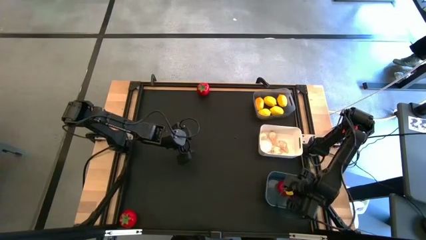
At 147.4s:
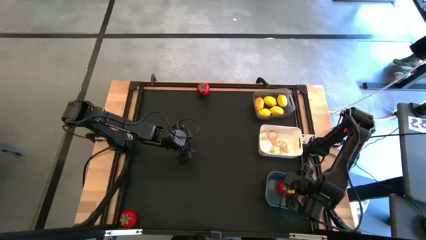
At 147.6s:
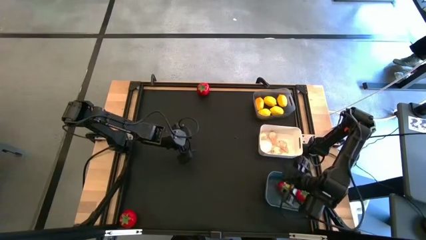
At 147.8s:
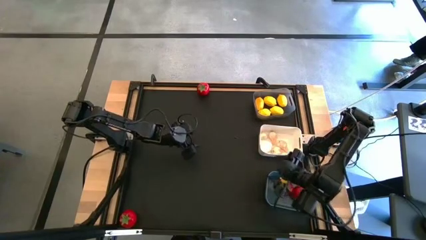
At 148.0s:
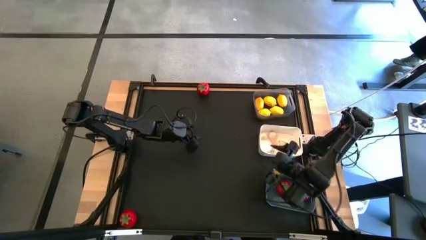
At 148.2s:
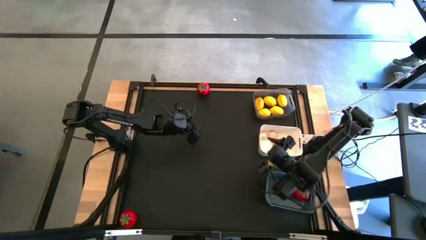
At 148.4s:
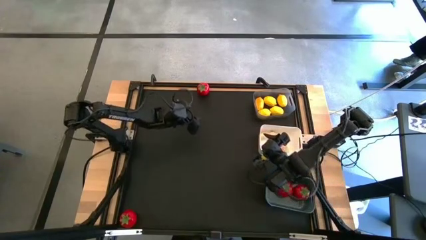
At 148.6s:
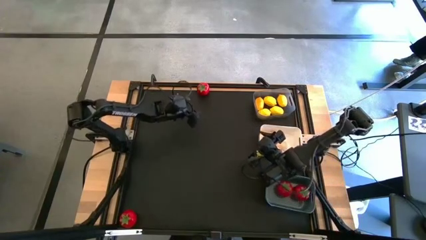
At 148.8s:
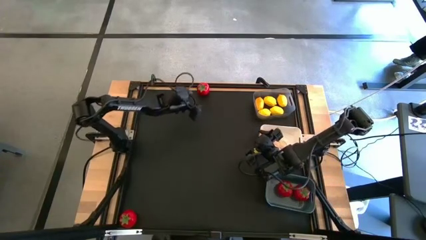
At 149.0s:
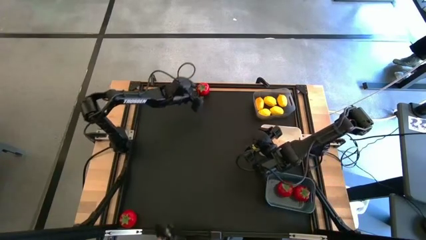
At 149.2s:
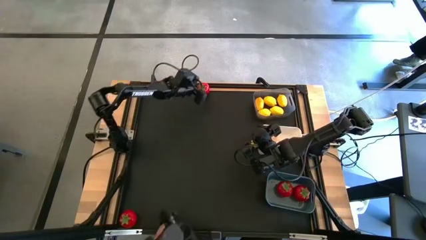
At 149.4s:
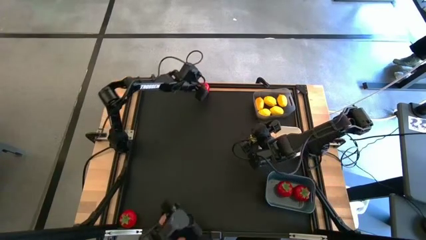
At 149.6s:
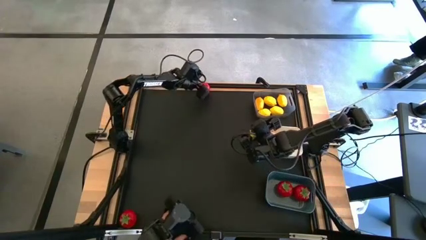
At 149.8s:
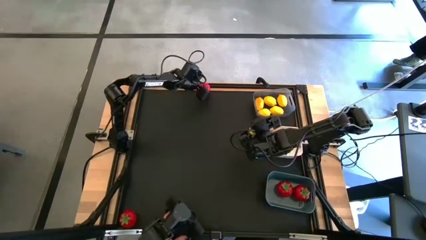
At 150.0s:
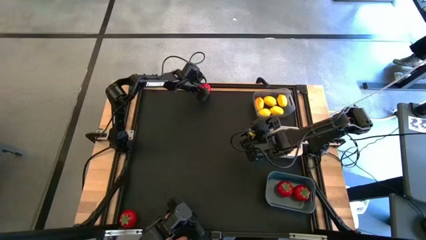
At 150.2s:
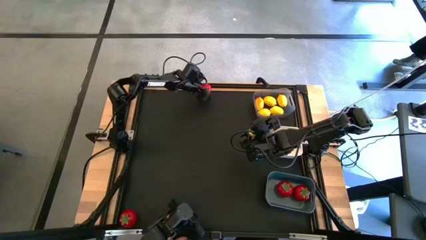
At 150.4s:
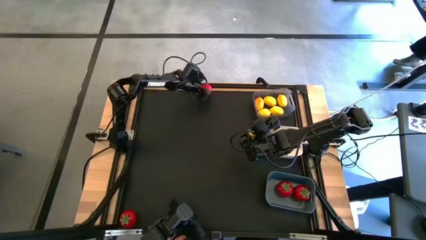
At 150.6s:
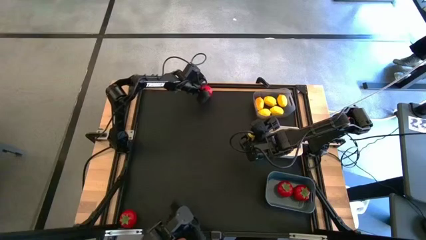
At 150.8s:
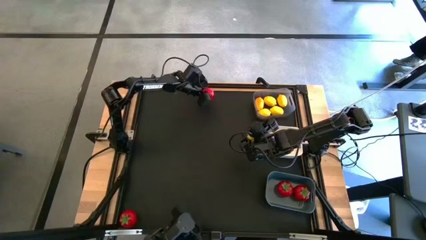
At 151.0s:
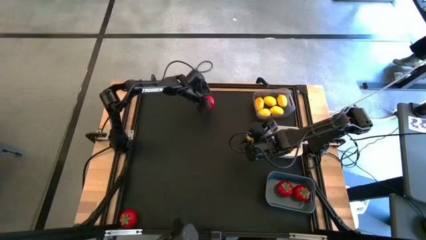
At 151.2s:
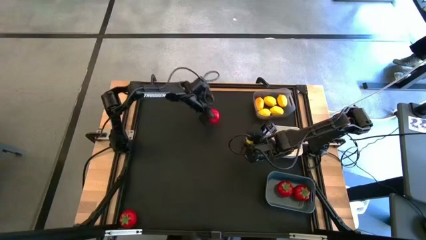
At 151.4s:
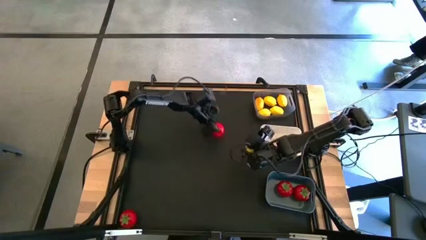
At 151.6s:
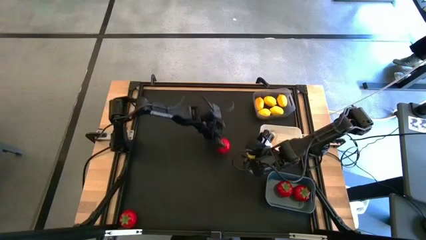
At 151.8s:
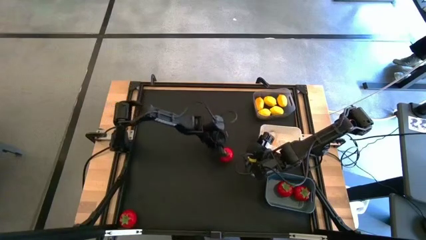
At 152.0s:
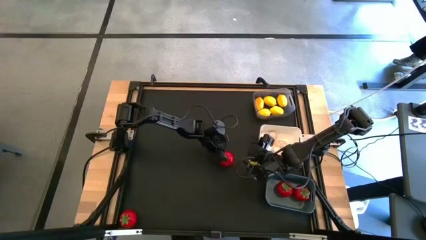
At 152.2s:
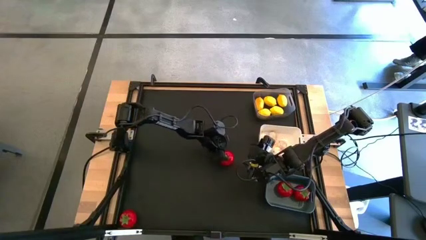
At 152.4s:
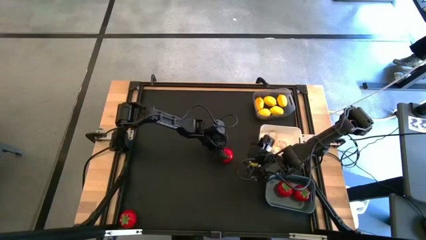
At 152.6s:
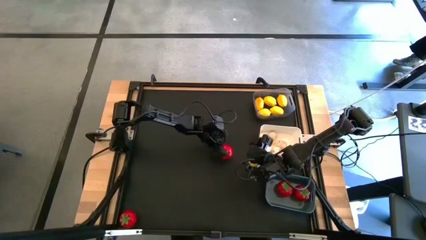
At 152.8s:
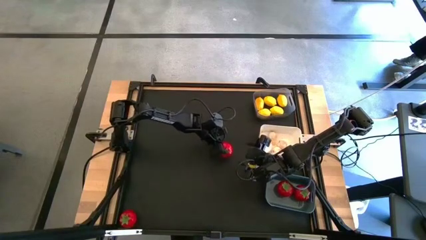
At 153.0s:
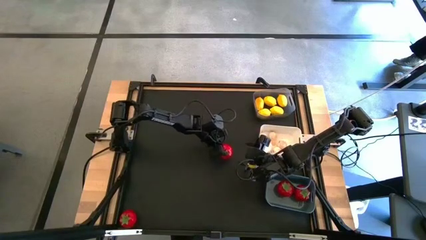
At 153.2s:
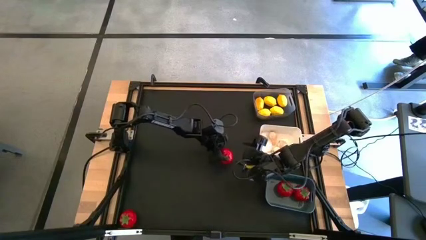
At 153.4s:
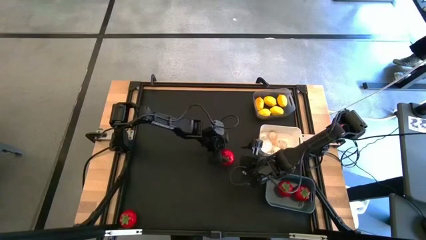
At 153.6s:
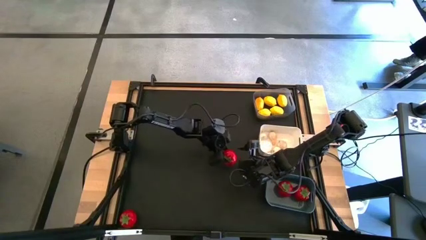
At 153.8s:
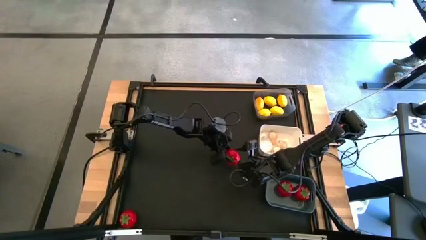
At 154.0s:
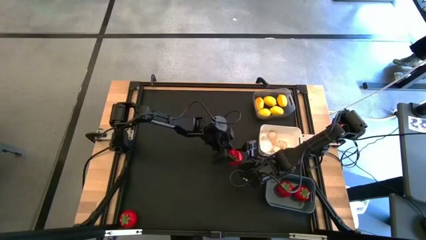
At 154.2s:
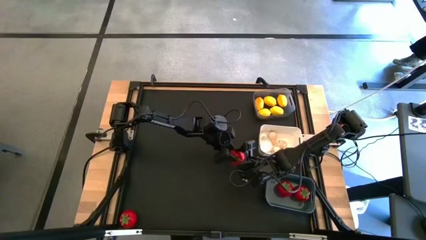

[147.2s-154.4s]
Task: Sort produce into baskets
Put the tomato into the the blue bin

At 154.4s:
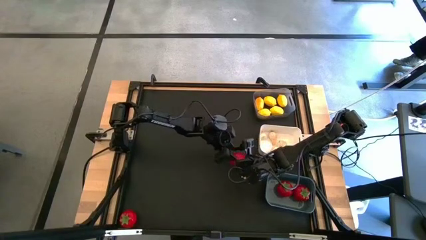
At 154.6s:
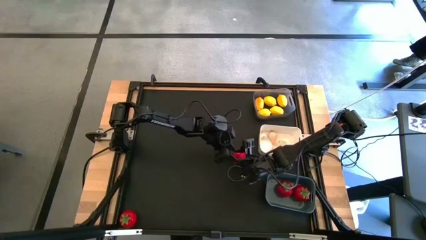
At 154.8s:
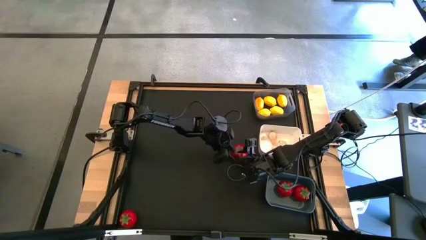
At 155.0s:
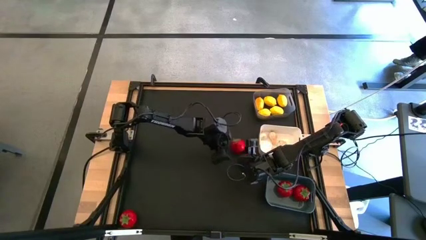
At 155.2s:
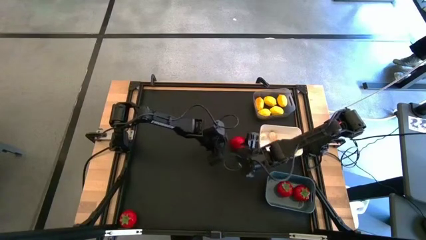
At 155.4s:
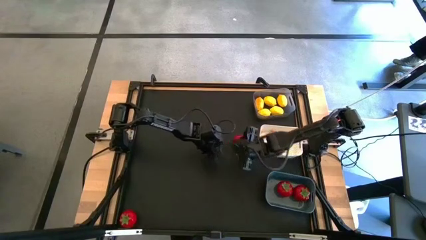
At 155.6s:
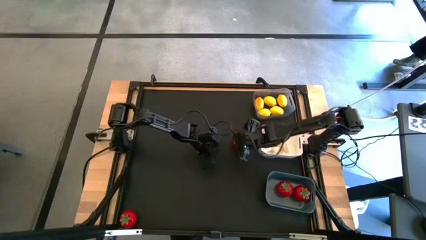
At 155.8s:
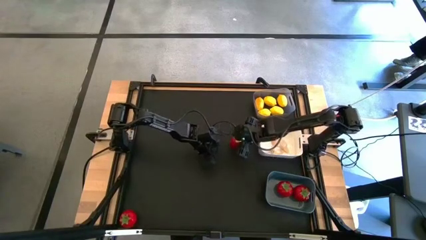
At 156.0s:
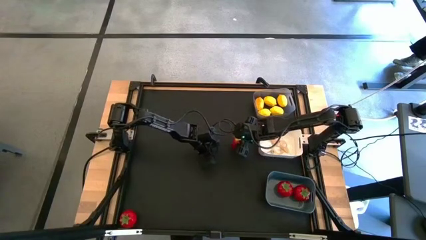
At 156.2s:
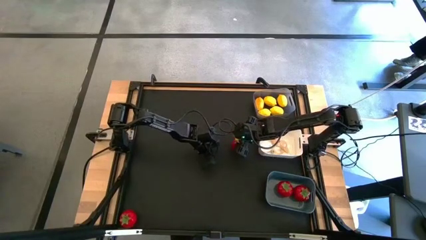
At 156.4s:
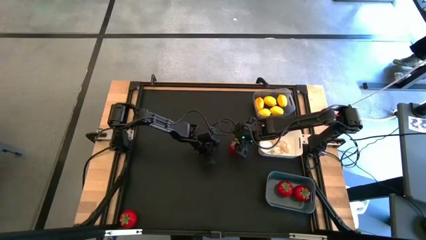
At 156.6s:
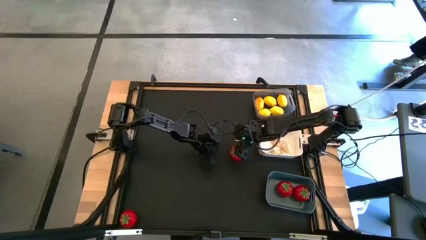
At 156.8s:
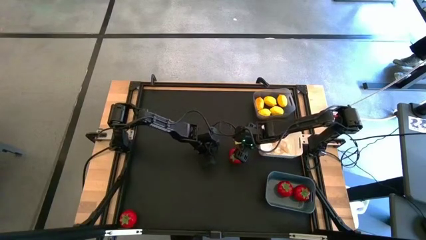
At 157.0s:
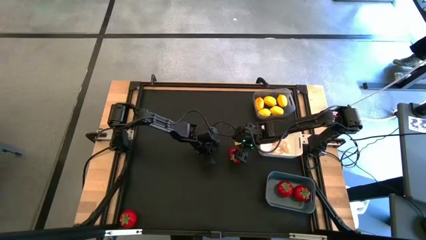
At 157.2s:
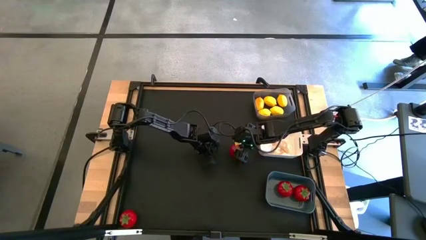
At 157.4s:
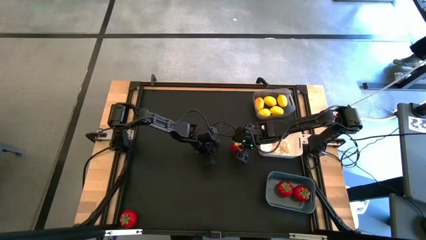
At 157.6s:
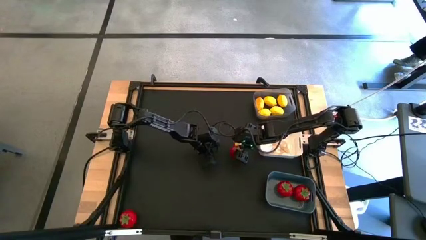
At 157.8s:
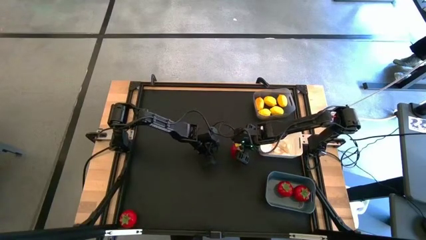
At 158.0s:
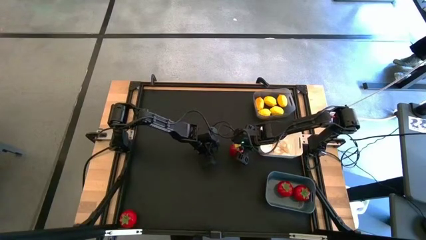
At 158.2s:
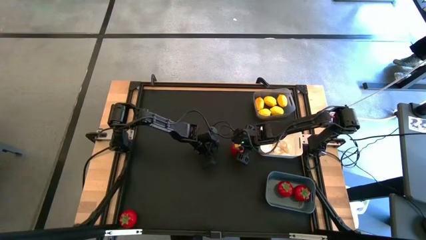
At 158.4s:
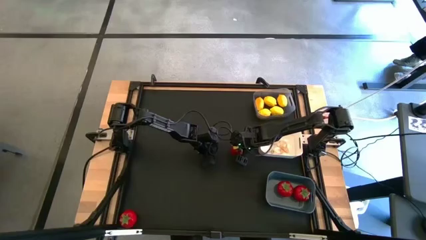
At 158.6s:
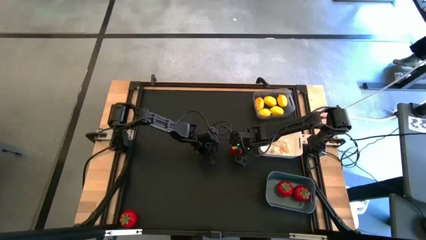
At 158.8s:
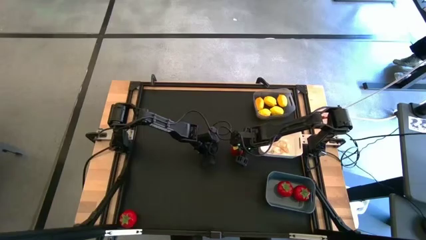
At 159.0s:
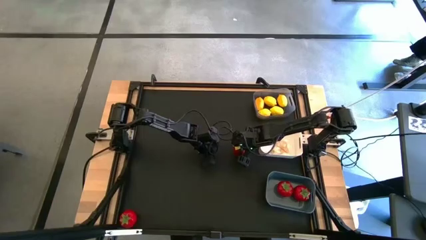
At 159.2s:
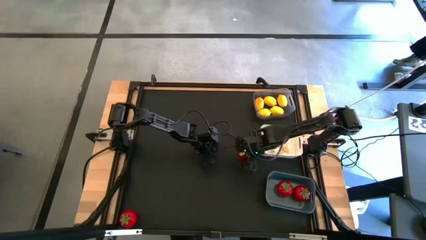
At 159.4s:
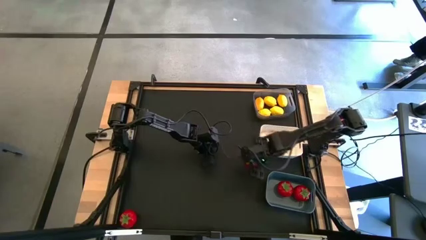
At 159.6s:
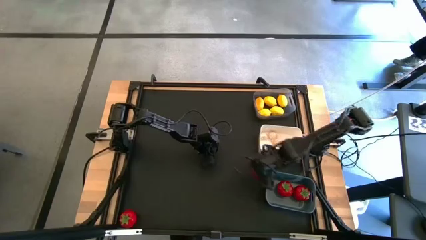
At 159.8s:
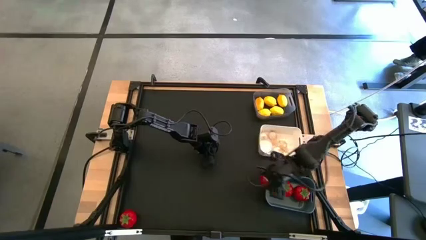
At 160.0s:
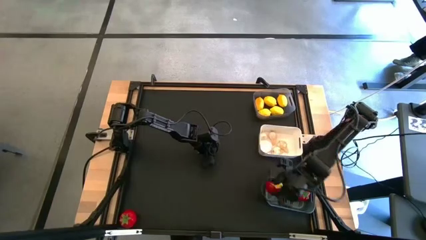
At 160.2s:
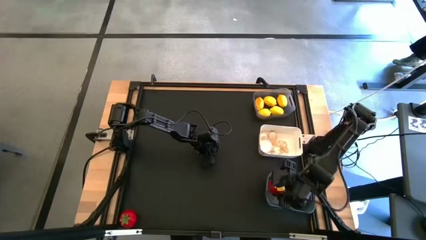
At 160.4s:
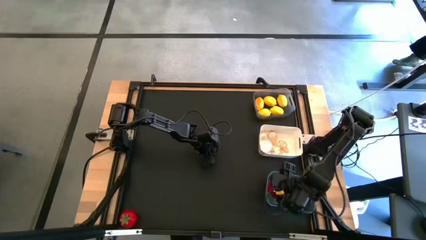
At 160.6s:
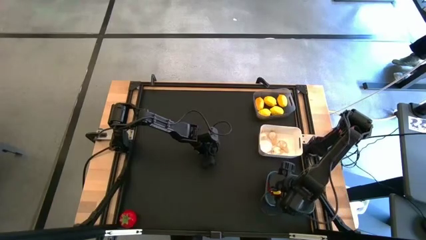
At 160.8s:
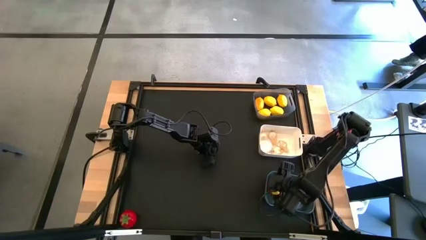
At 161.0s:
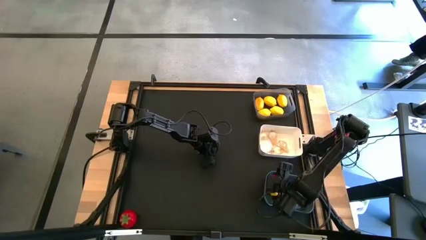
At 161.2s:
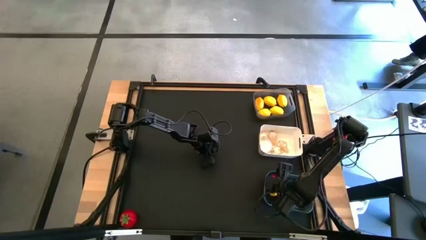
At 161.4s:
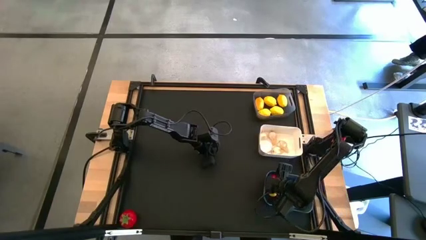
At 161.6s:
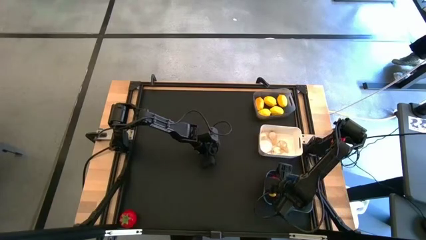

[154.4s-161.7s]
Put the tomato into the the blue bin

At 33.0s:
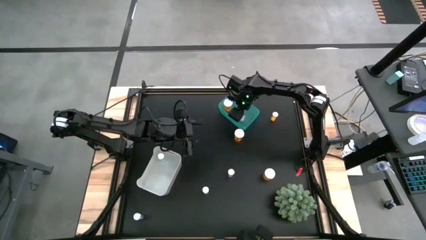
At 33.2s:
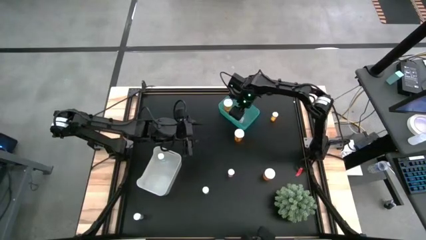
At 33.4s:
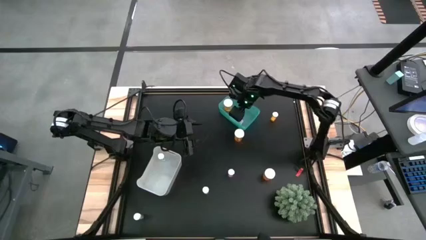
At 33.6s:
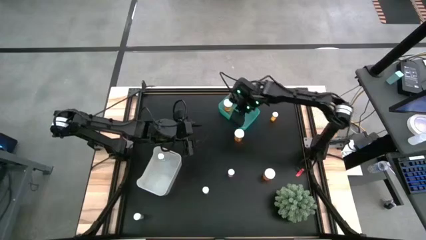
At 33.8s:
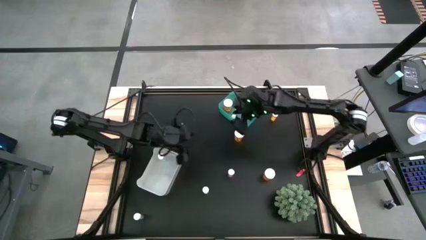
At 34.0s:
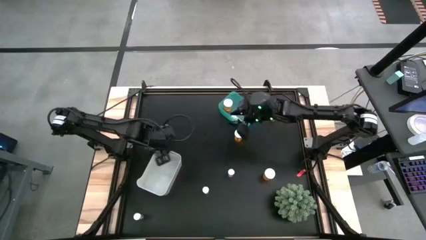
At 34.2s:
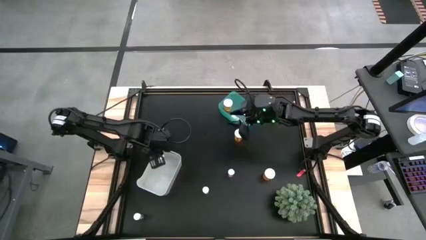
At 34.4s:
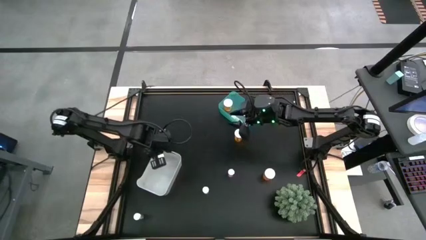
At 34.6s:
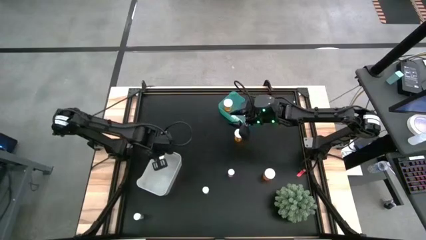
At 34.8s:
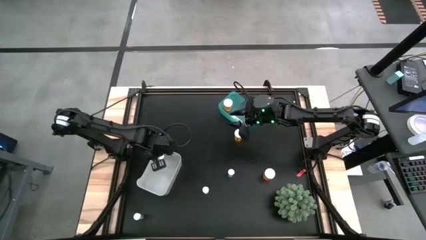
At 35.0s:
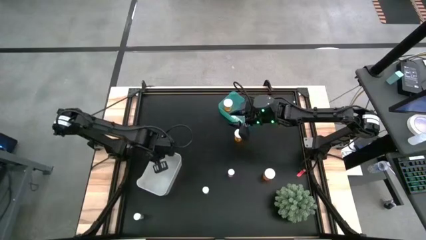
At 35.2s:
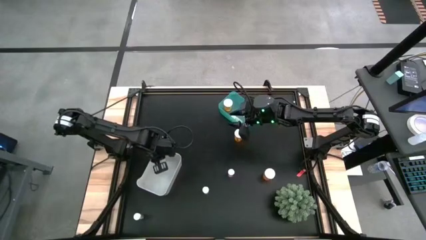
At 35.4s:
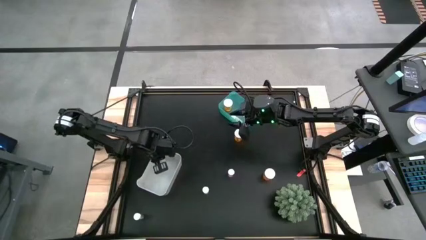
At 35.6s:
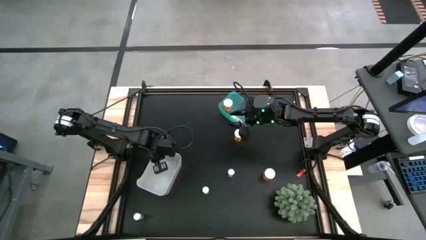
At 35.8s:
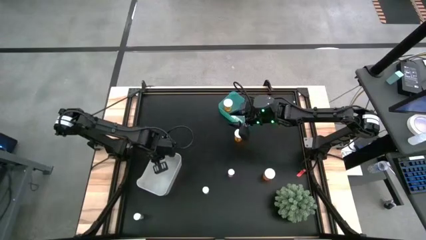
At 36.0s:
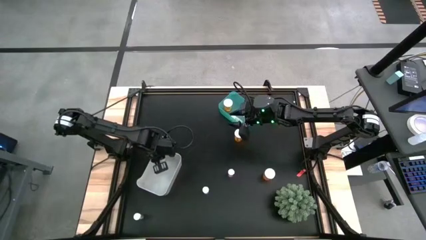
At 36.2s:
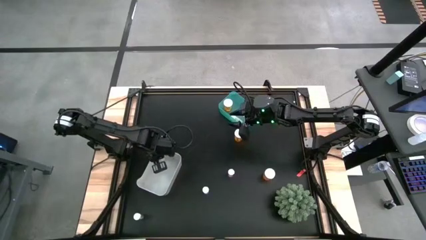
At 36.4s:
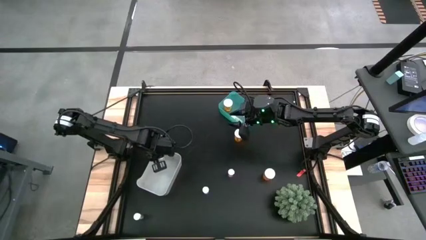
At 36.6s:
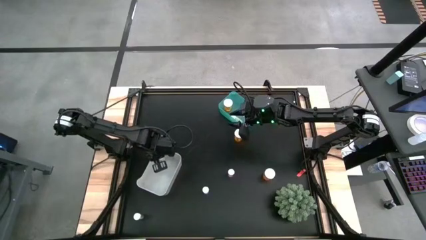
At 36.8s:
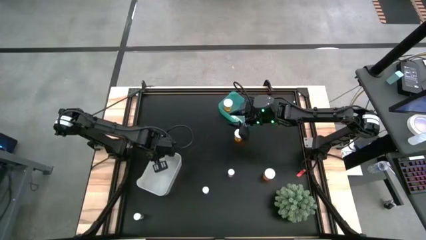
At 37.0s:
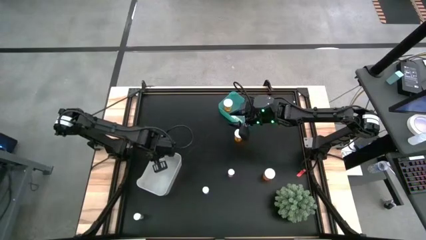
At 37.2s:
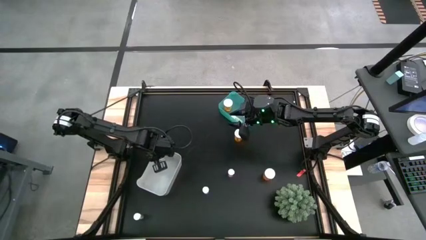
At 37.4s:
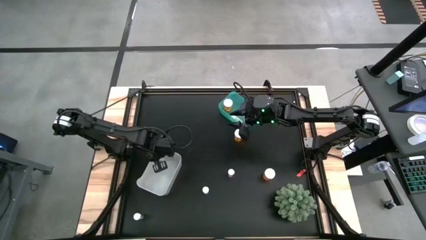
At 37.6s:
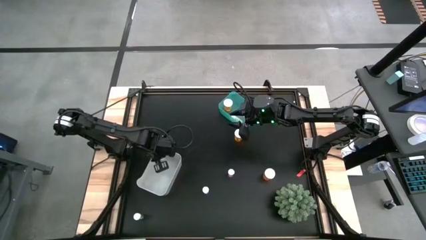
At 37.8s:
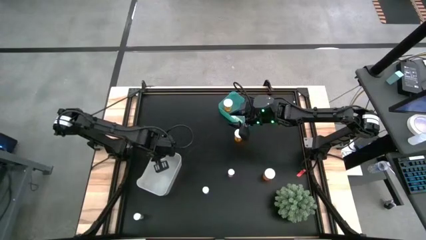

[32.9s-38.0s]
Task: Pick and place medicine bottles into bin by pill shape (circle, oval)
Adjust the blue tablet bottle in the gray bin
